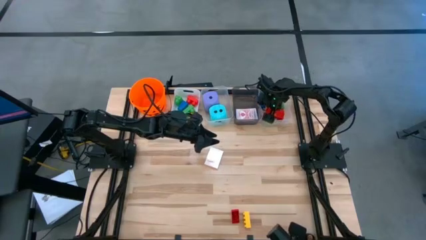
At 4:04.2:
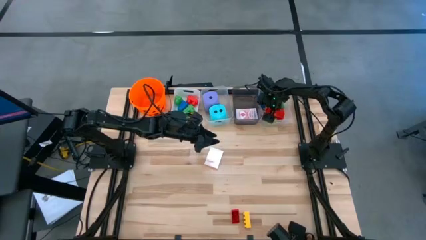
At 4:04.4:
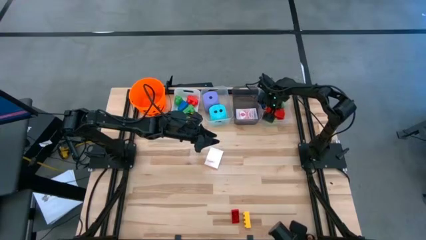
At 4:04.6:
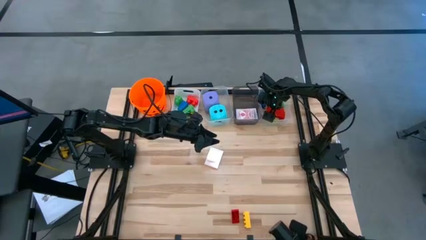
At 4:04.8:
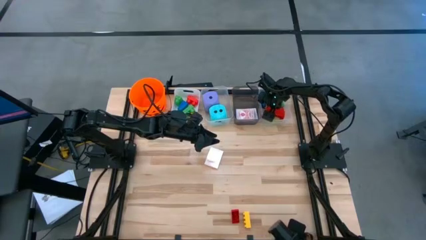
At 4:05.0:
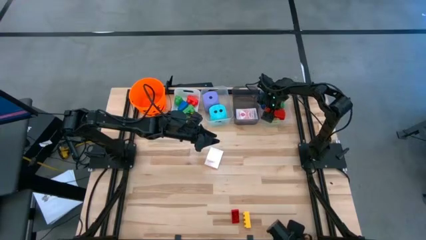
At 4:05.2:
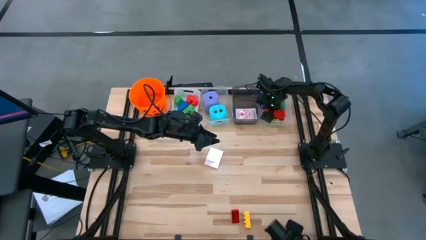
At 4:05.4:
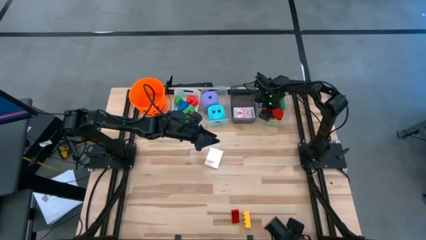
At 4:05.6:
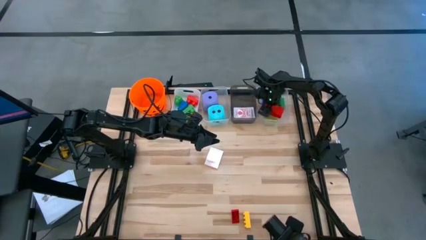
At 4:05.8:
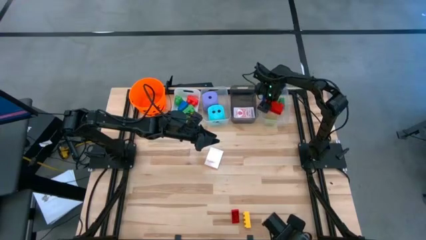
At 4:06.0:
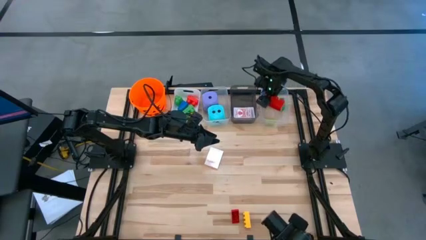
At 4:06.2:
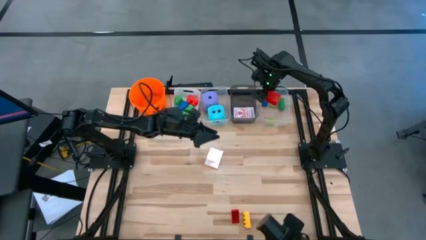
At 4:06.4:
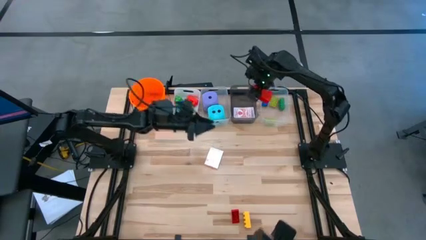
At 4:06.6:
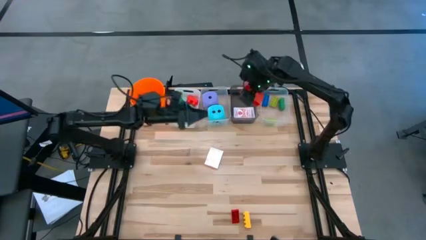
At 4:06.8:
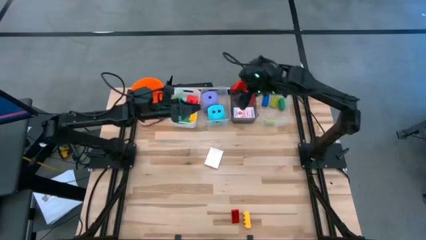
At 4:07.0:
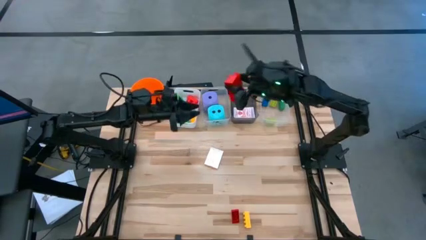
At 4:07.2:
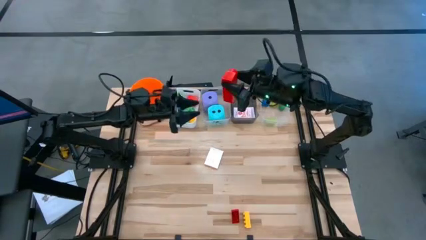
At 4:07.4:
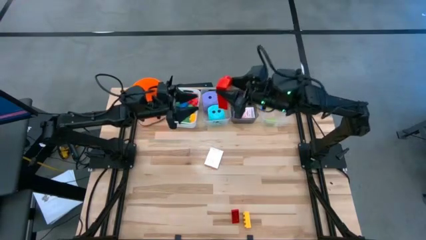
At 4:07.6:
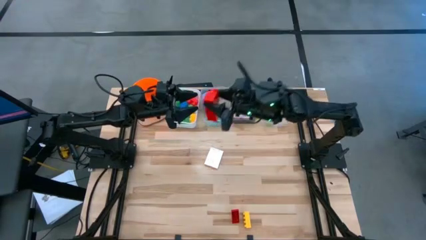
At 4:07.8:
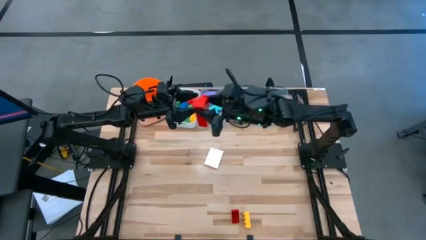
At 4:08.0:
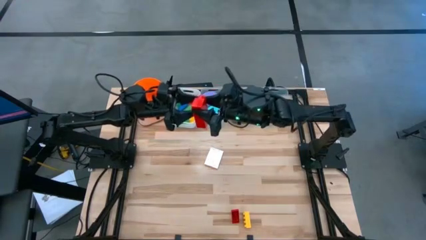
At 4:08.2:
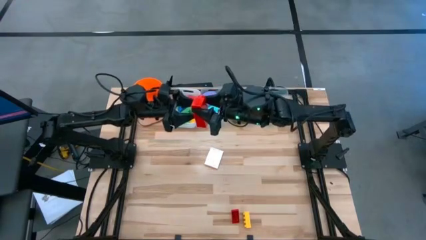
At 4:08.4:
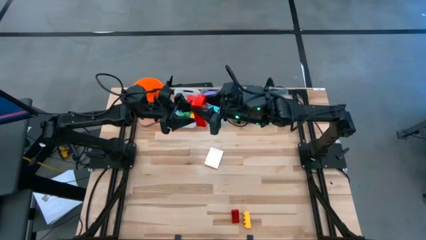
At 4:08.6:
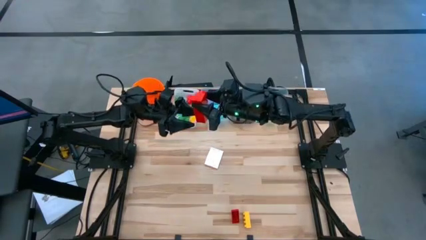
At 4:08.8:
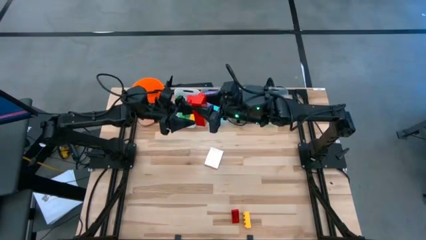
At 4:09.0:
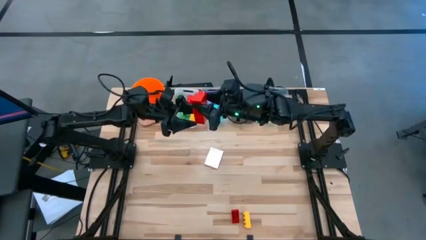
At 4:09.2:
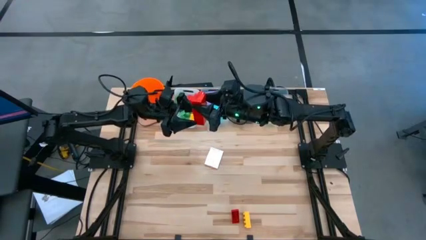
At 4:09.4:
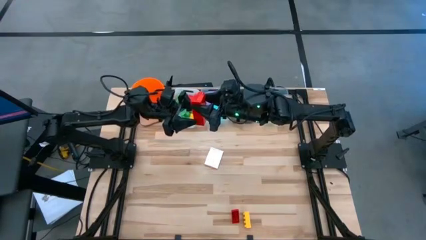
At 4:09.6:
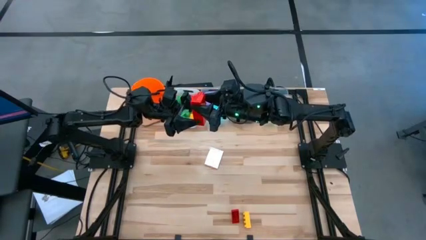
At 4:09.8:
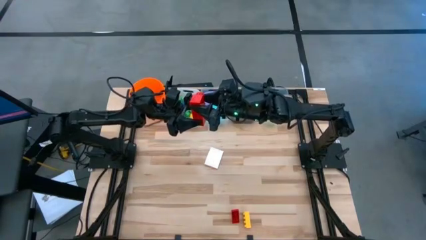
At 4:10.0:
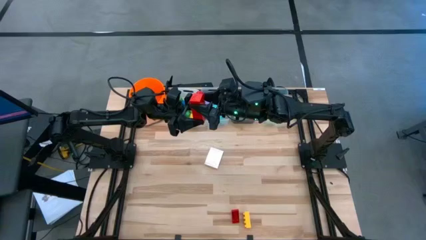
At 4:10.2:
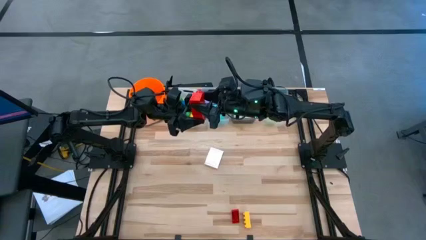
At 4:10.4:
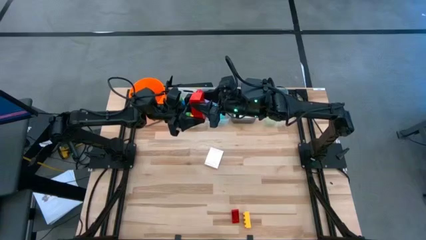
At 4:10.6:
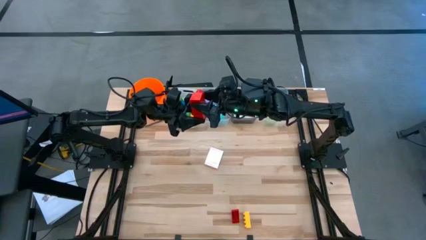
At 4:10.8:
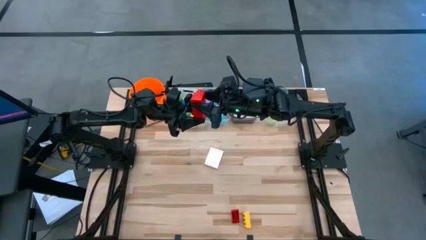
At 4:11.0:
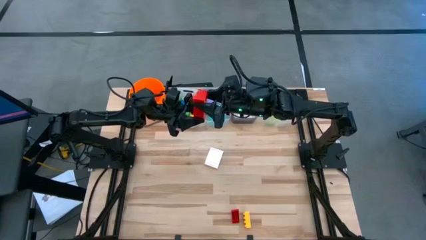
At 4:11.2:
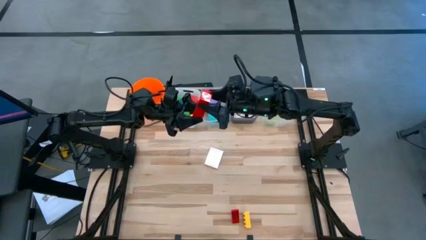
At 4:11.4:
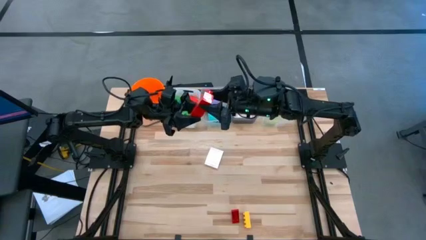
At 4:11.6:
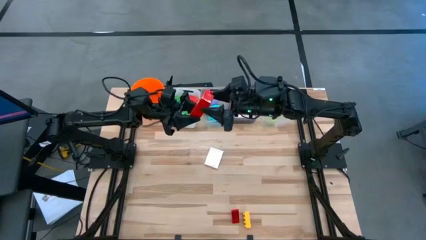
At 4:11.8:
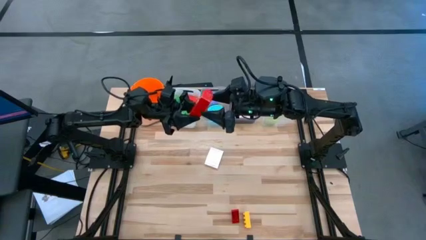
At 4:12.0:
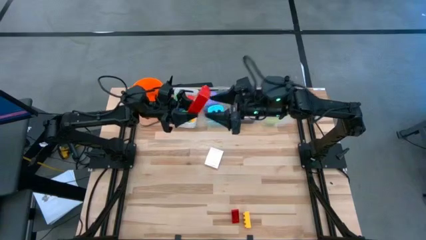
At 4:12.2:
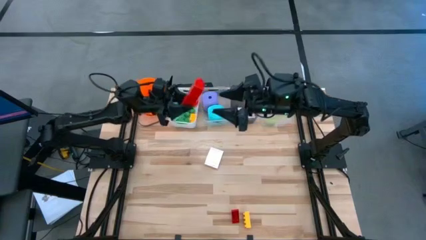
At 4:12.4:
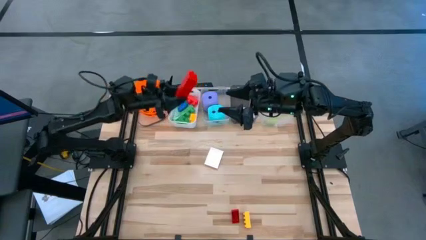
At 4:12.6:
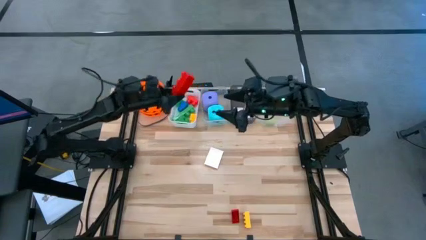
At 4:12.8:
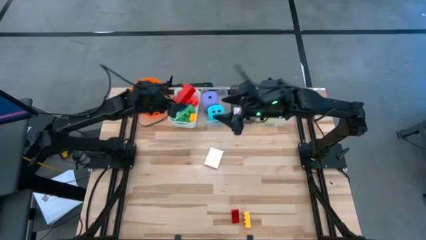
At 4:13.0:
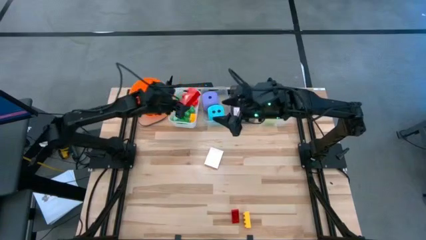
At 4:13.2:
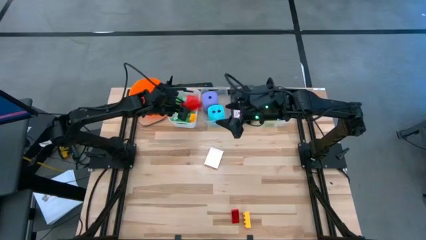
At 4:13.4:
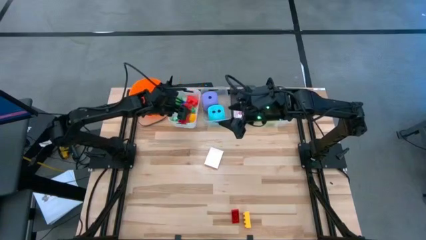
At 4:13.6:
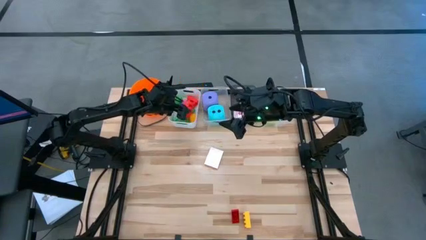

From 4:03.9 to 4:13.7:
Task: Pick & Place Toys
Put the 3 stud red game piece into the white bin

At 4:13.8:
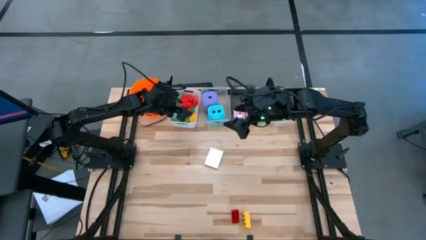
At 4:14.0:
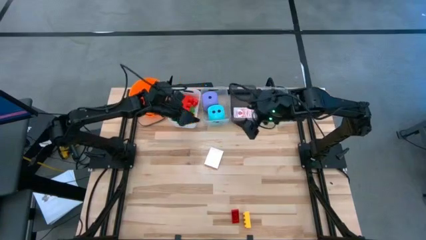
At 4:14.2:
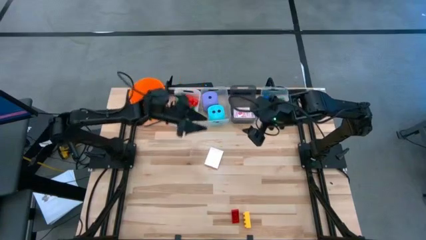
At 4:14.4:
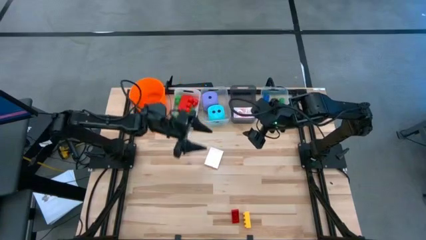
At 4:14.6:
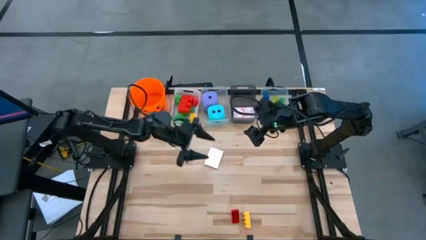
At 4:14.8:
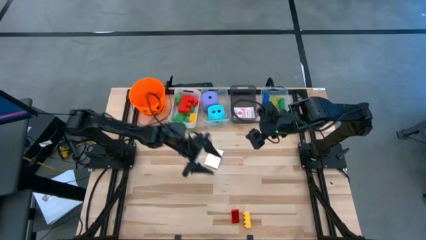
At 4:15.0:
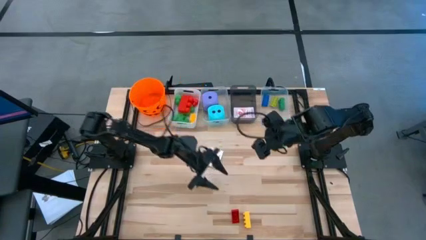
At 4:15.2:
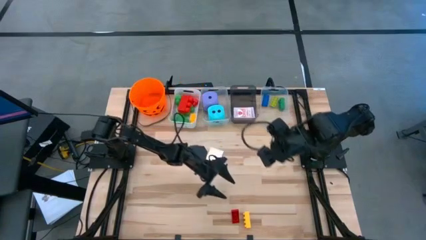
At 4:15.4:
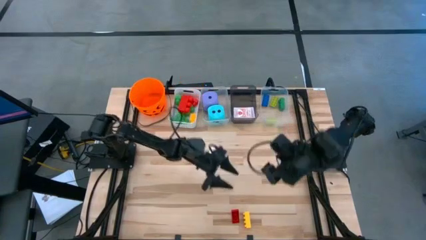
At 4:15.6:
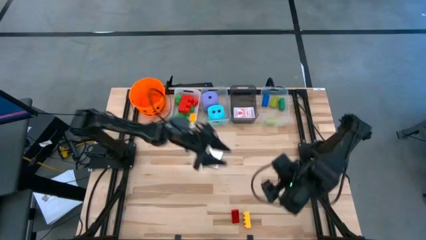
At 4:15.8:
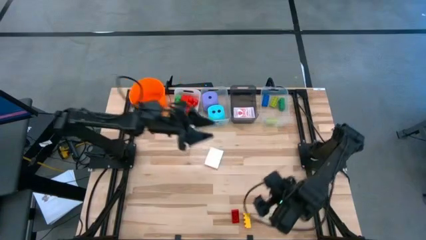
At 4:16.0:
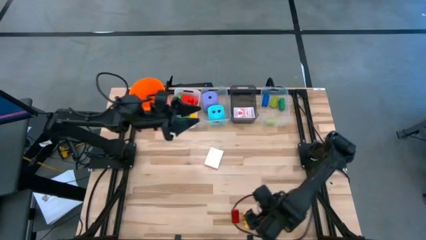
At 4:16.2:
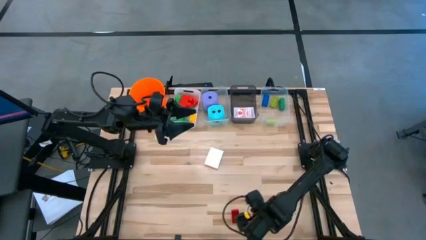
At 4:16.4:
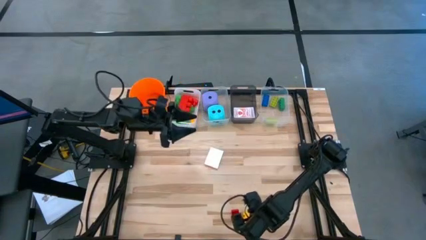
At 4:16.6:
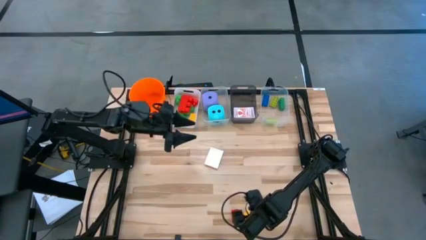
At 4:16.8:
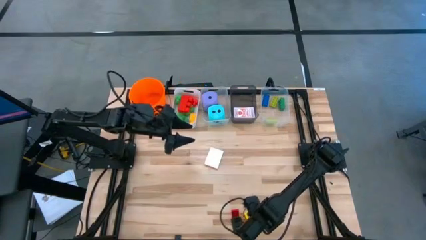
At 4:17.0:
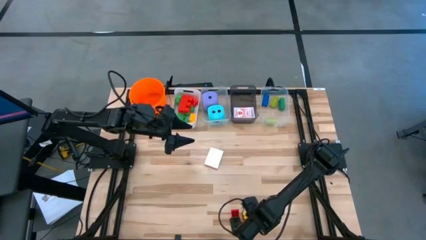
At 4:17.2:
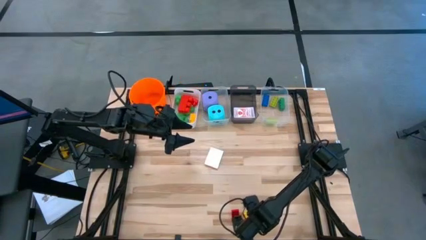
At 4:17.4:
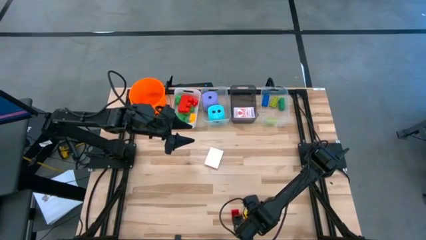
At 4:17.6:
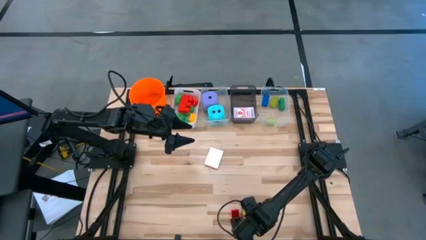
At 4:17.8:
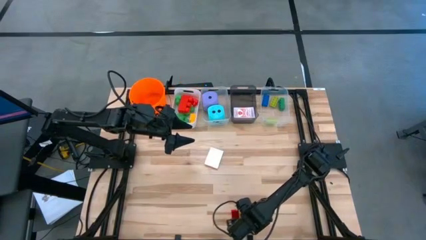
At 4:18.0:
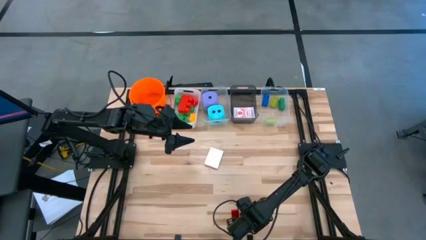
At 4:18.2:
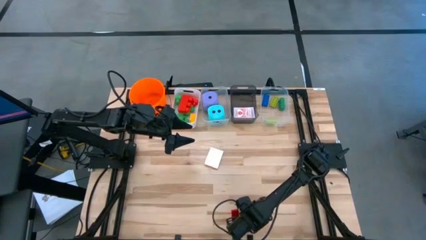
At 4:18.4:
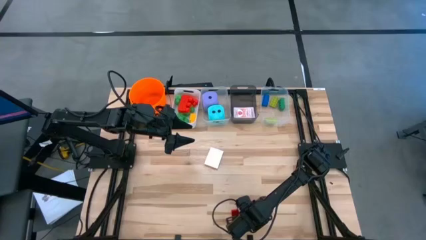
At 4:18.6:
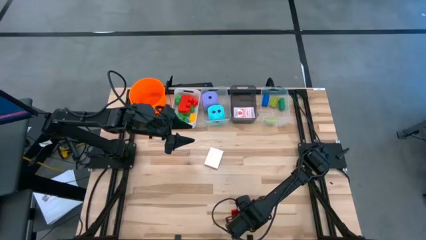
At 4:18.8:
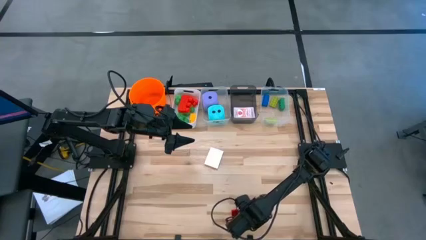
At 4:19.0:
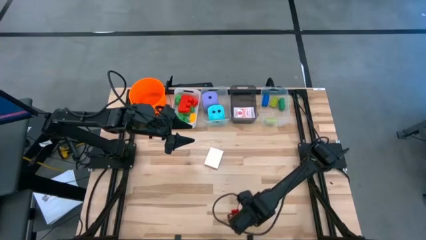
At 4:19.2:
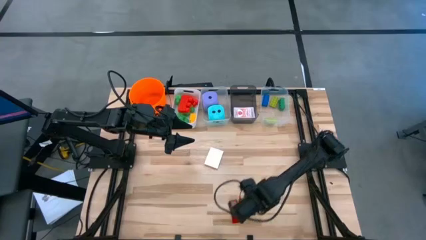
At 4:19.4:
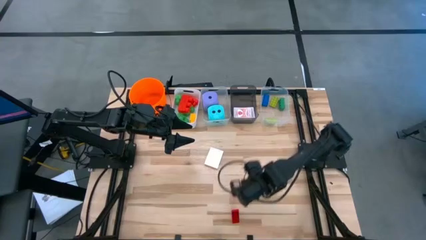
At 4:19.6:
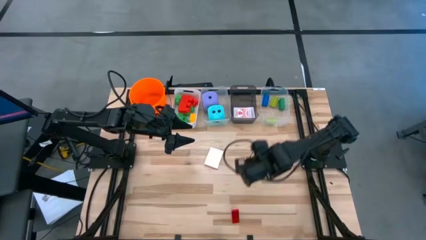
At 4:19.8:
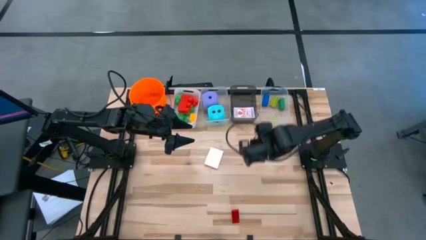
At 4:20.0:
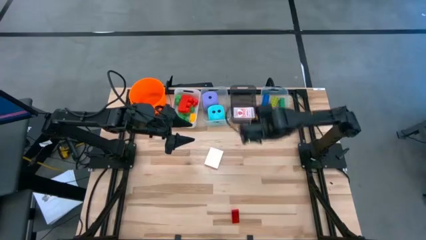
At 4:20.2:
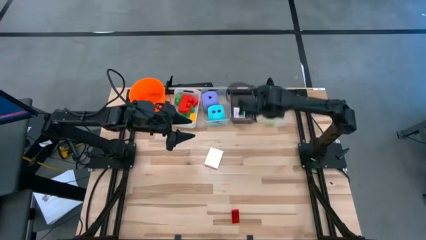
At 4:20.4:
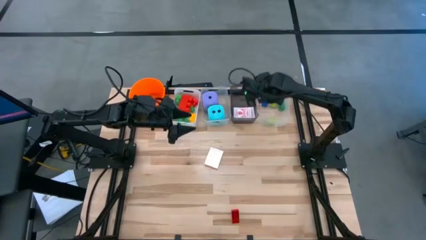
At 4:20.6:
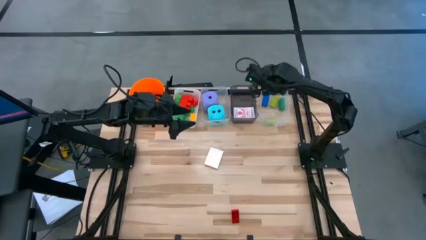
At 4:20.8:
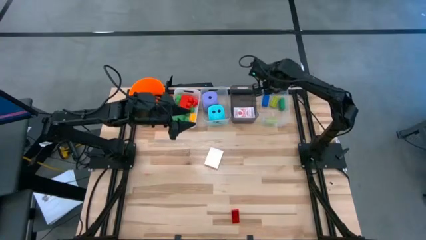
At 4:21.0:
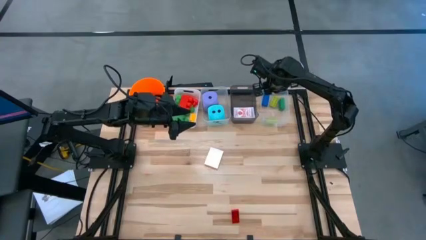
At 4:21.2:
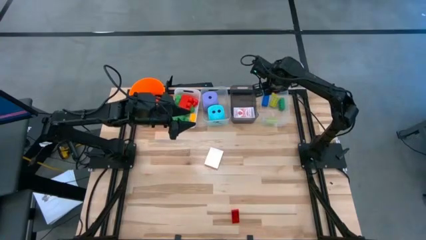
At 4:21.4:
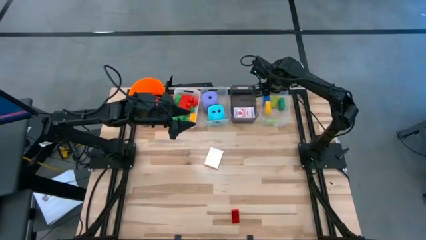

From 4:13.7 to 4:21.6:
Put the yellow game piece into the right transparent bin
